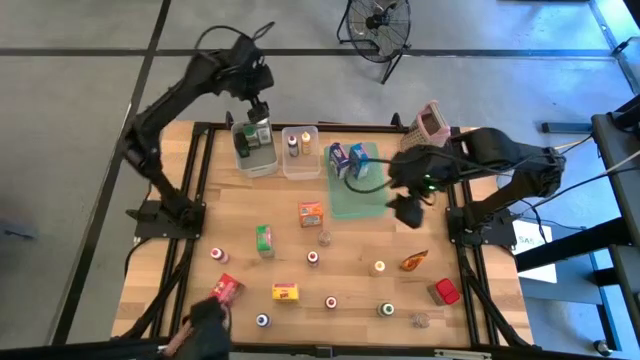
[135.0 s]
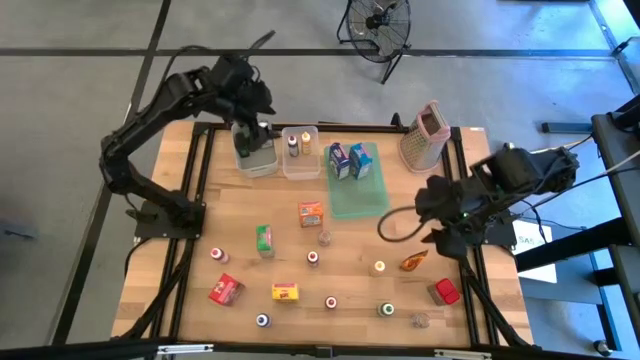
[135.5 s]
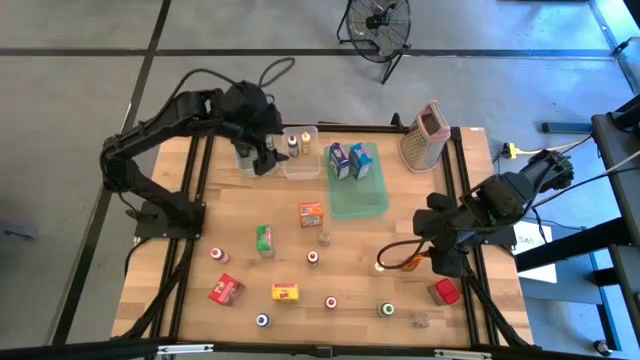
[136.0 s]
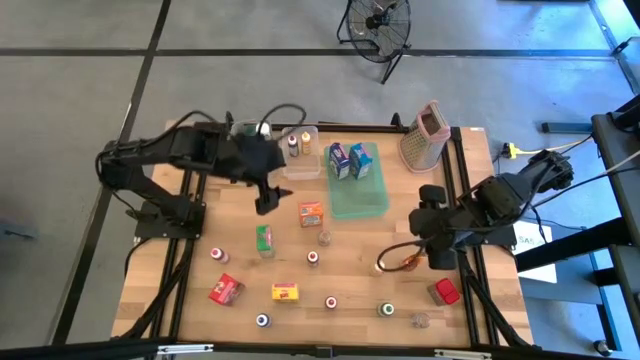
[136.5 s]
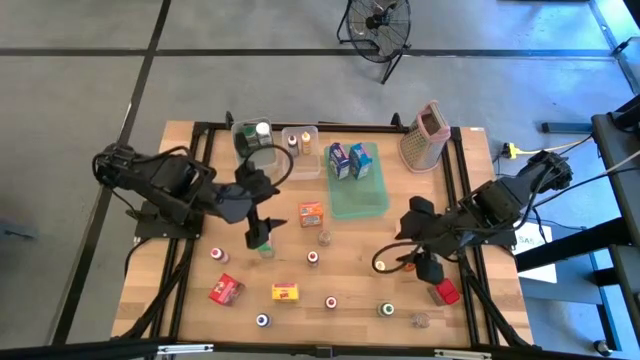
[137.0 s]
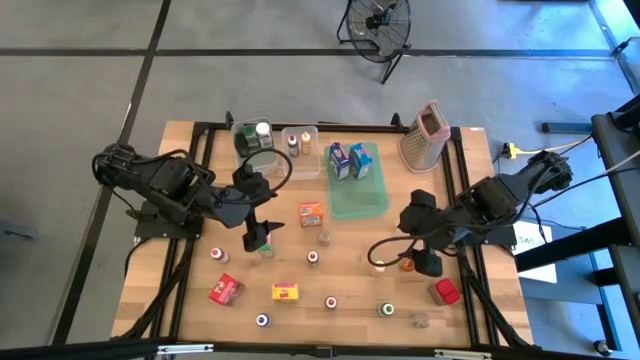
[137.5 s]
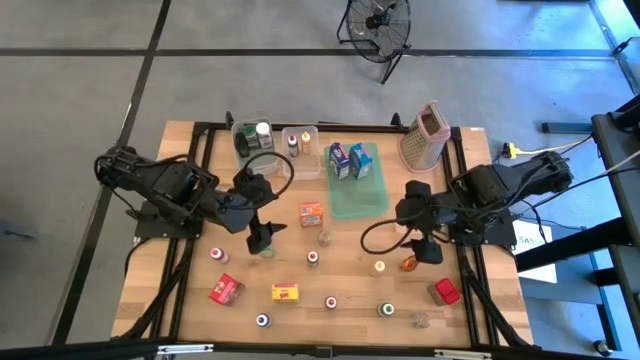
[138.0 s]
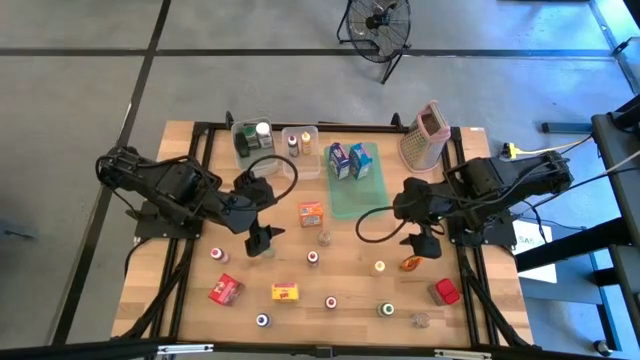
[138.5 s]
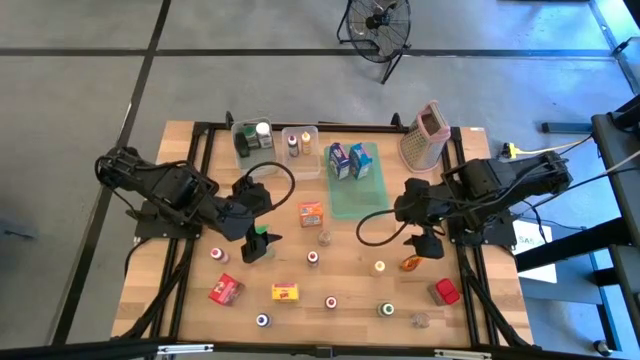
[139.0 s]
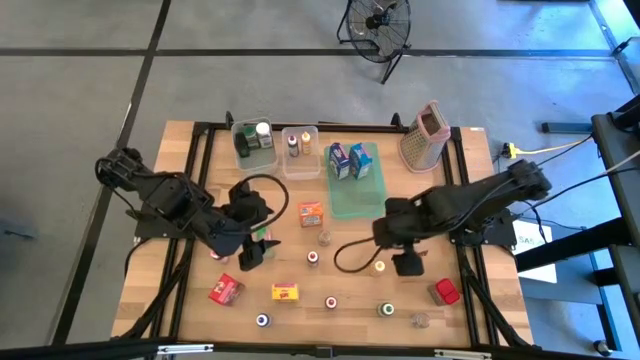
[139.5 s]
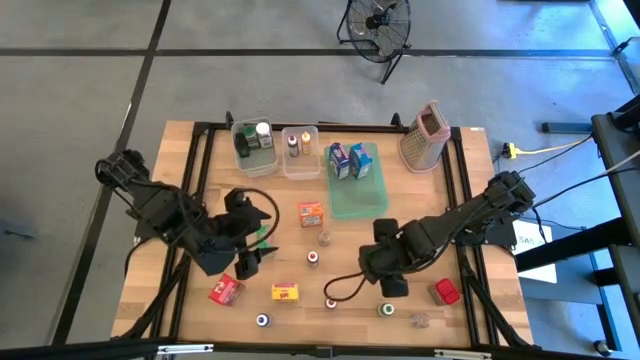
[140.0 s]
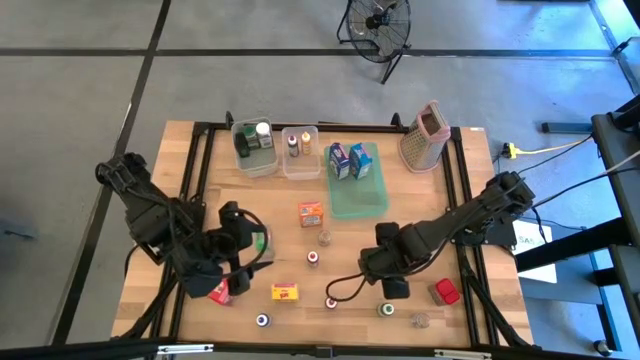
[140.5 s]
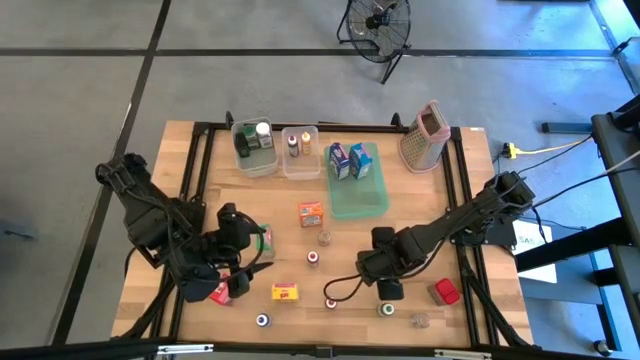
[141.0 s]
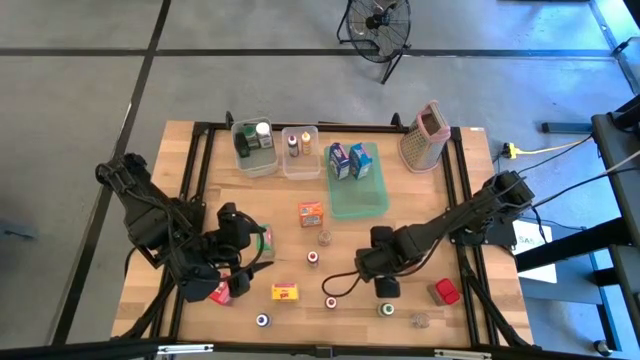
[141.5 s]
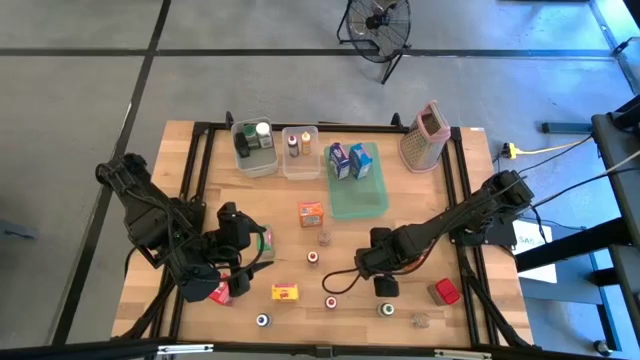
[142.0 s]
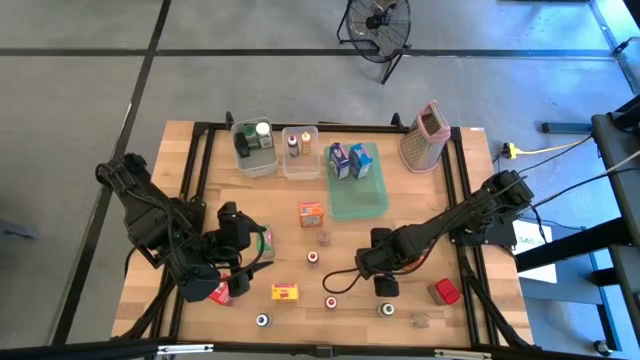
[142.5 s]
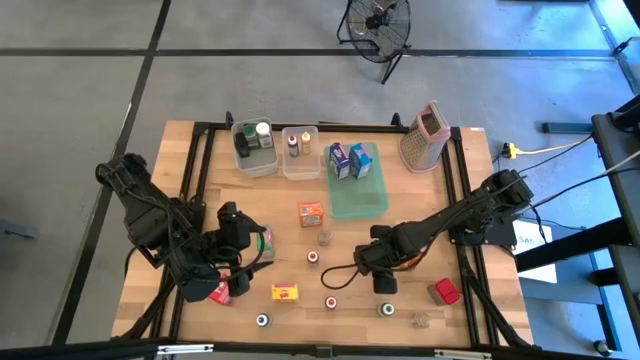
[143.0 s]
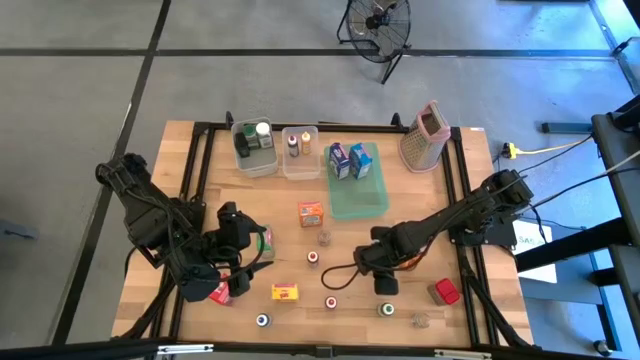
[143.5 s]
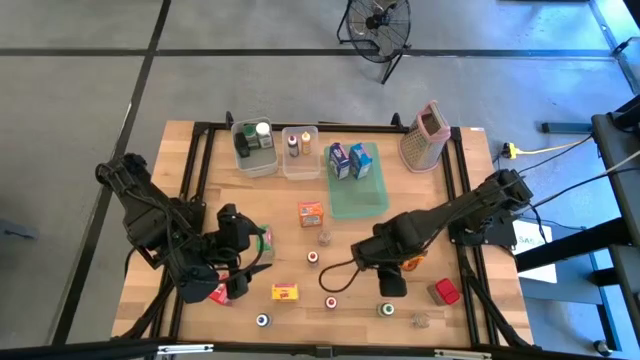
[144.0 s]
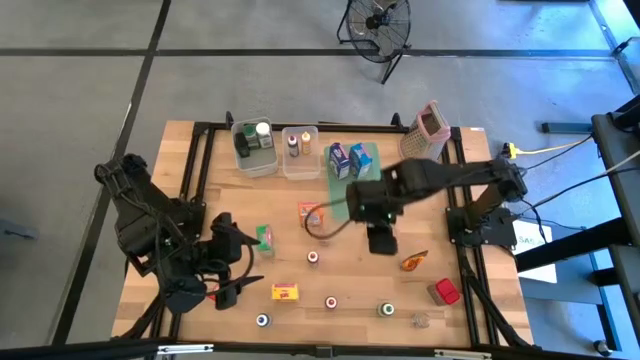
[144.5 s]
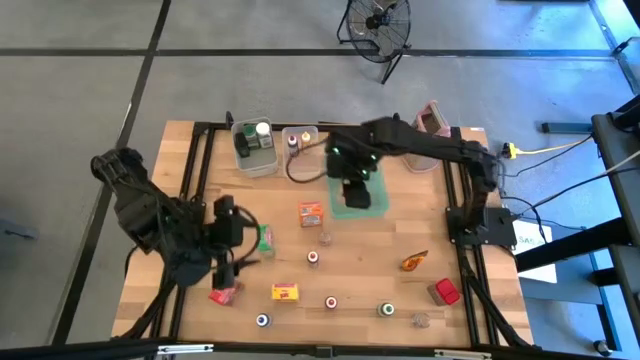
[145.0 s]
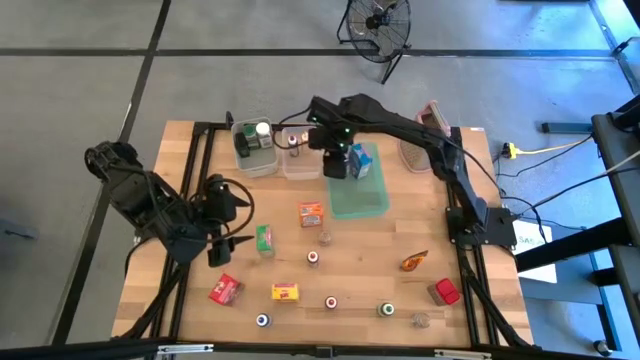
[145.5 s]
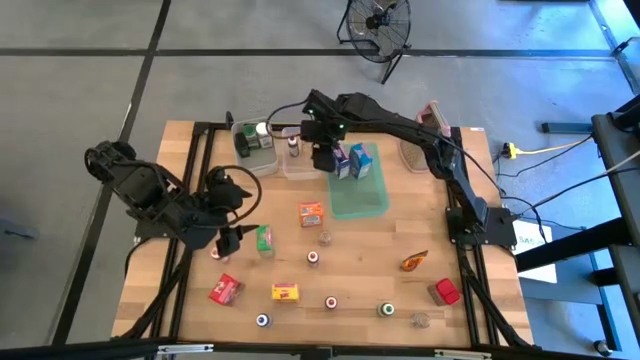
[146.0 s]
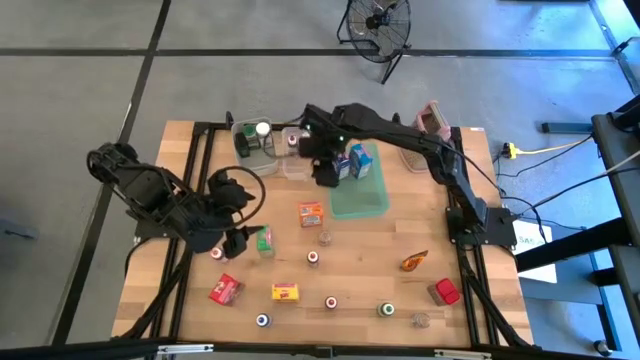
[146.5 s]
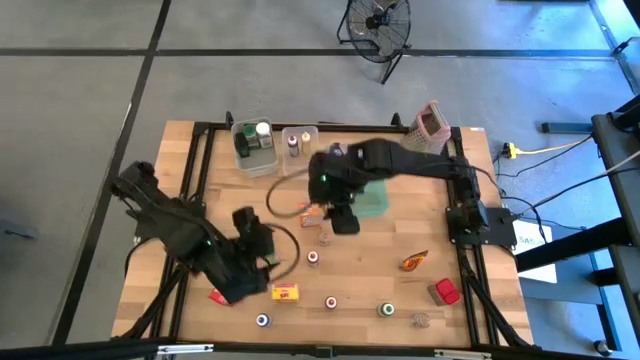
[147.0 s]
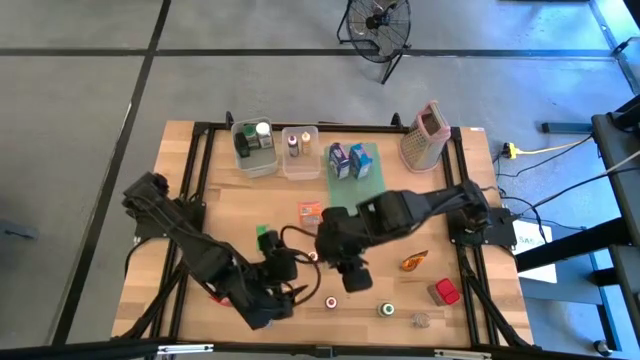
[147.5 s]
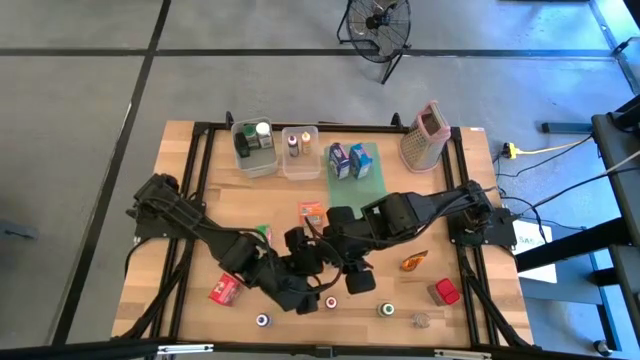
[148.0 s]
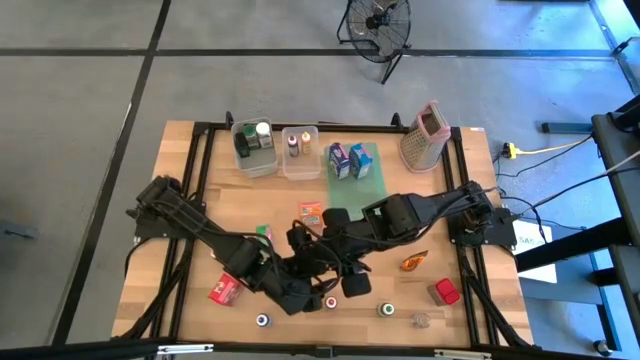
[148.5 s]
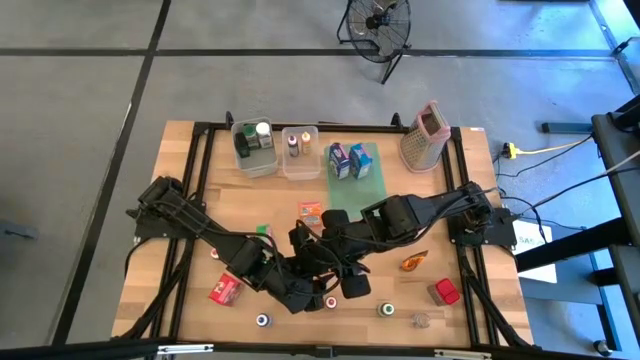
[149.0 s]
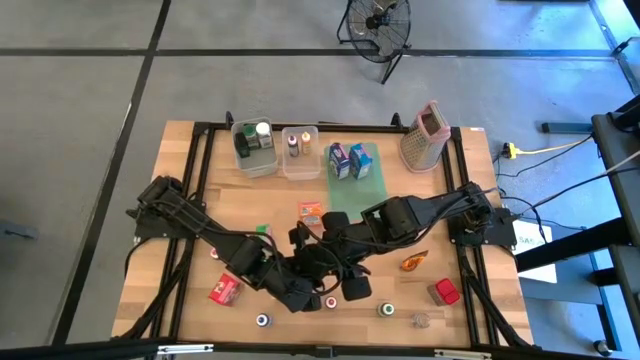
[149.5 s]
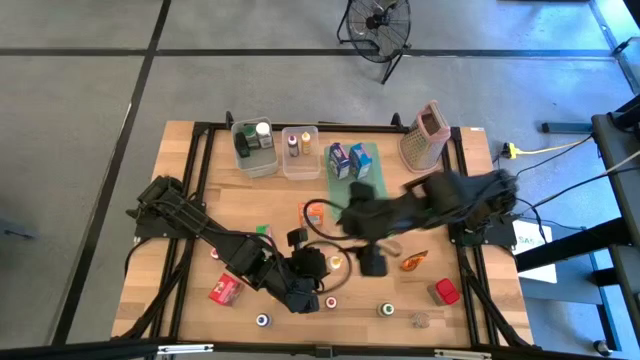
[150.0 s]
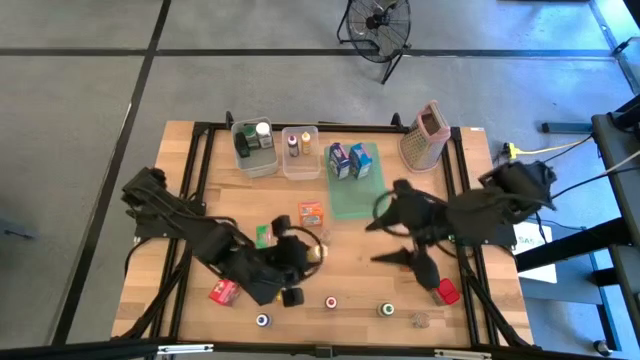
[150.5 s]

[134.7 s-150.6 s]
Task: Pick & Place Kitchen Items
Put the yellow food coloring bottle into the transparent bin

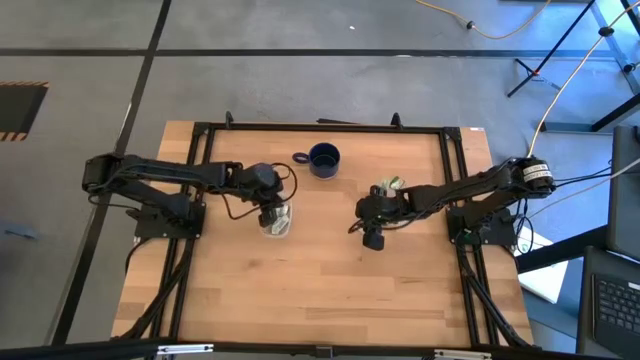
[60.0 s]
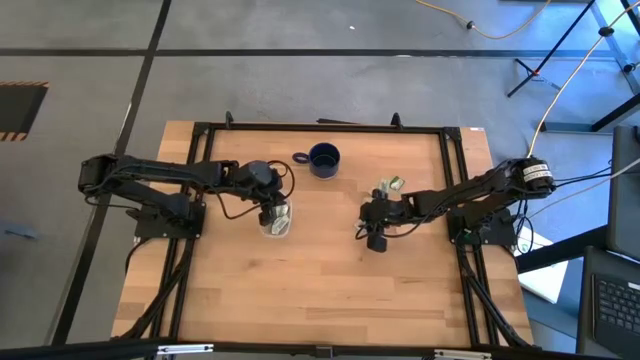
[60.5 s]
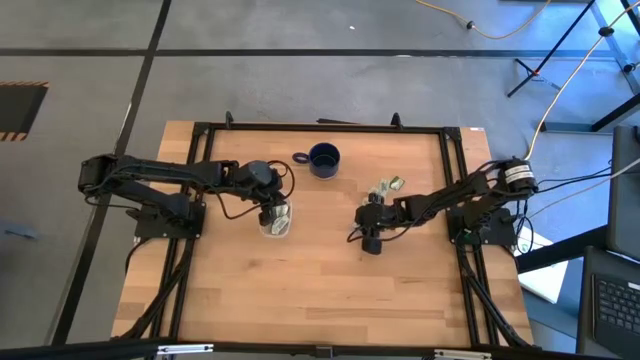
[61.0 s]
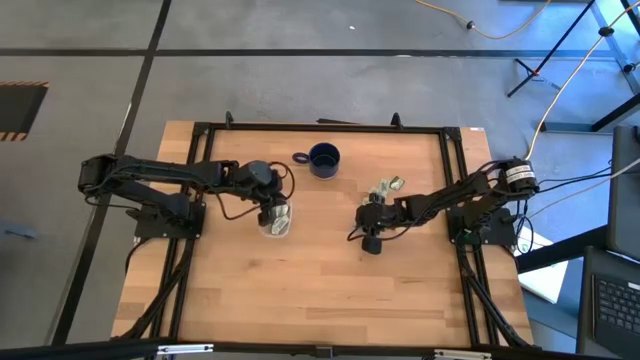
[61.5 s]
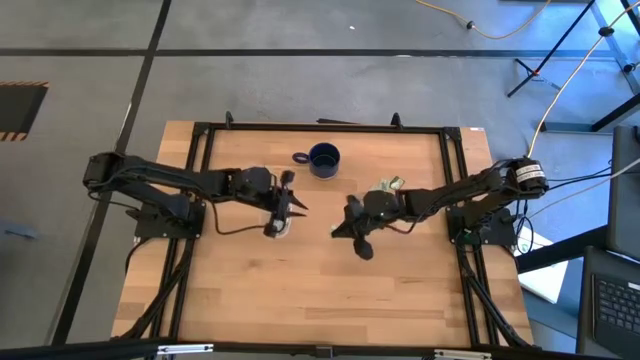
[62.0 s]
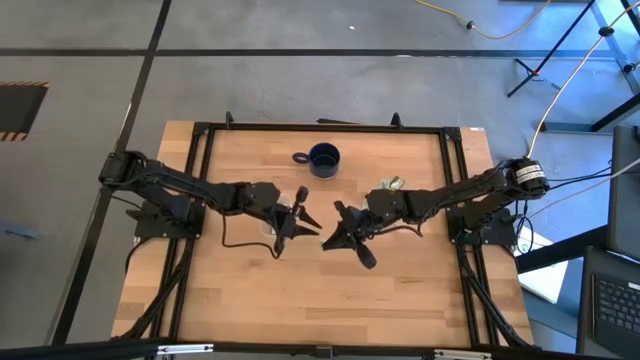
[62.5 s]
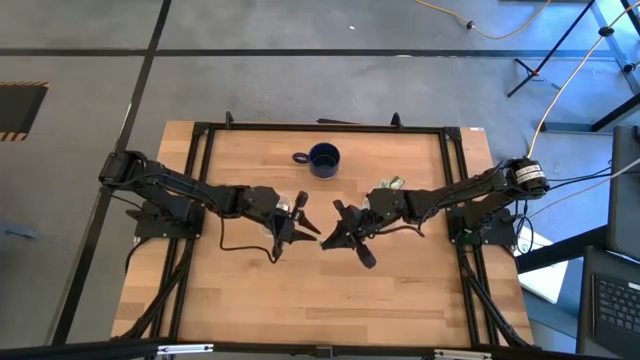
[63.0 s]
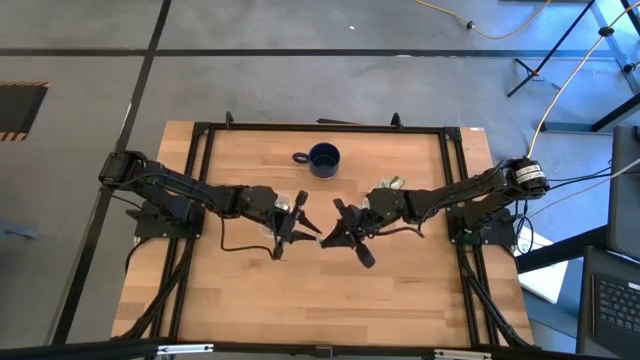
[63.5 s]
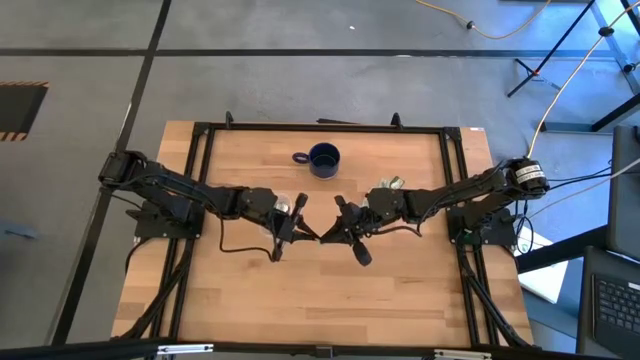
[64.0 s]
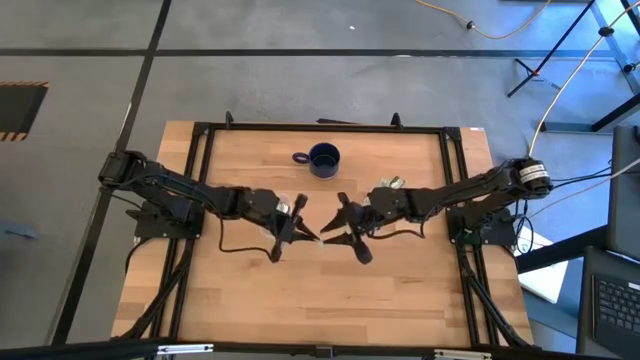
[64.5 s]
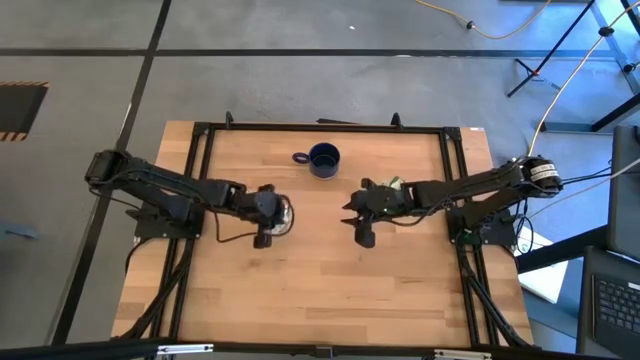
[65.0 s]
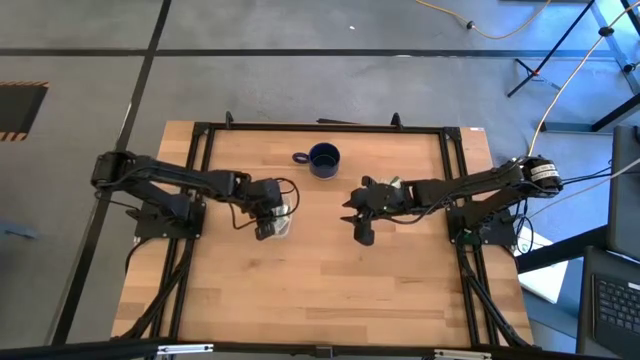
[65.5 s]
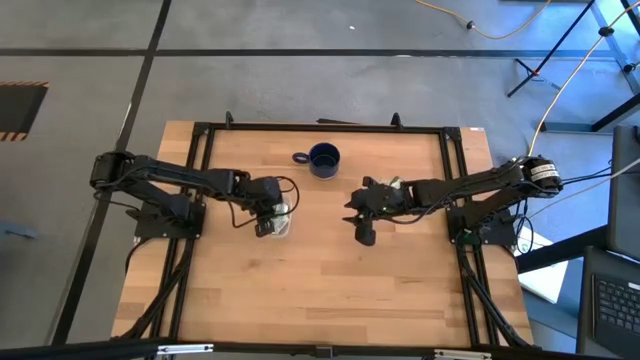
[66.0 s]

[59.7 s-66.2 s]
Task: Pick and place Stevia / Truvia into bins
Put the white stevia packet into the transparent container
